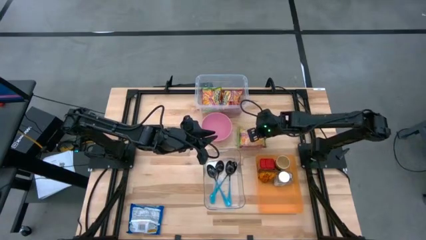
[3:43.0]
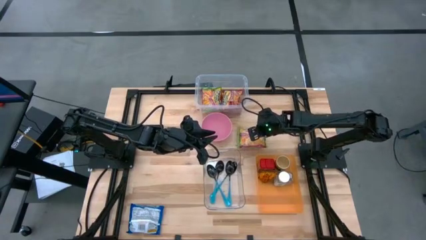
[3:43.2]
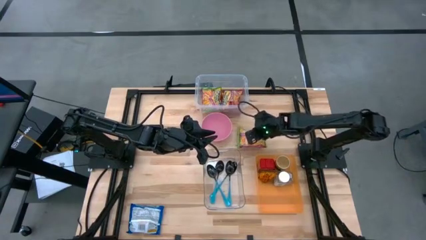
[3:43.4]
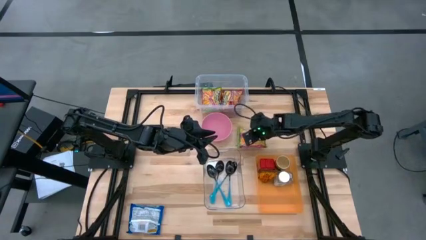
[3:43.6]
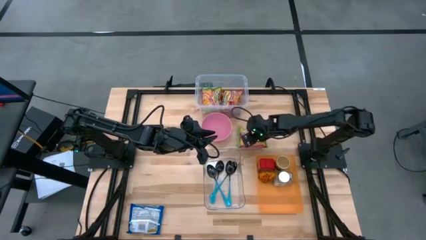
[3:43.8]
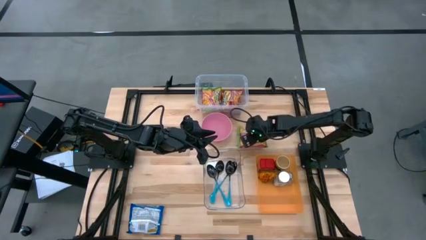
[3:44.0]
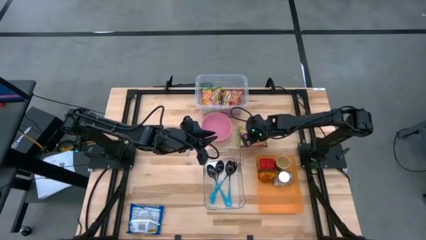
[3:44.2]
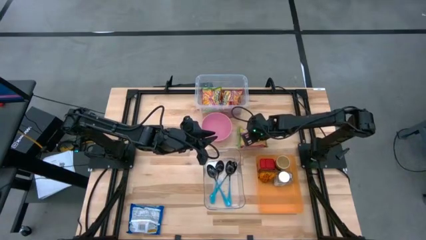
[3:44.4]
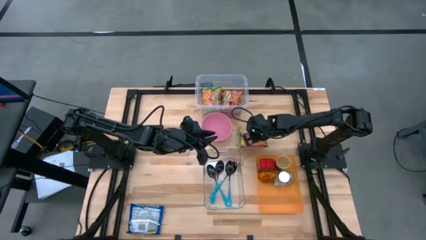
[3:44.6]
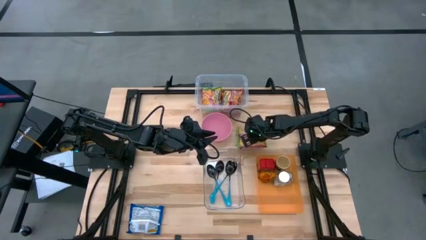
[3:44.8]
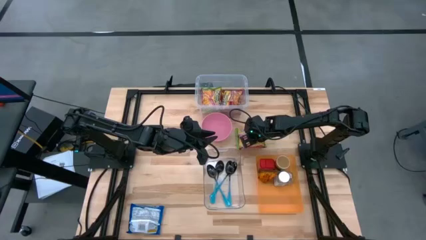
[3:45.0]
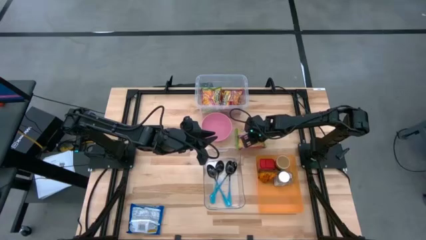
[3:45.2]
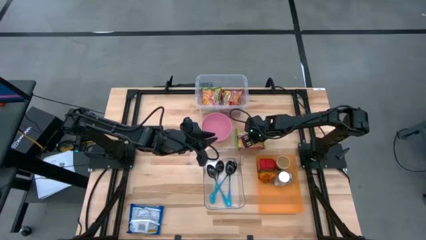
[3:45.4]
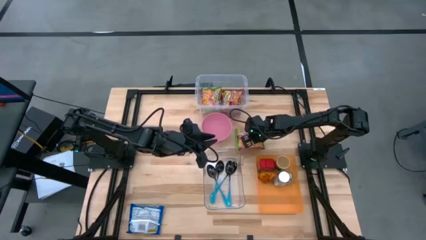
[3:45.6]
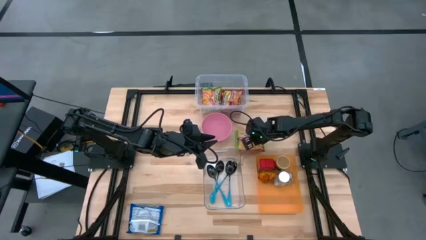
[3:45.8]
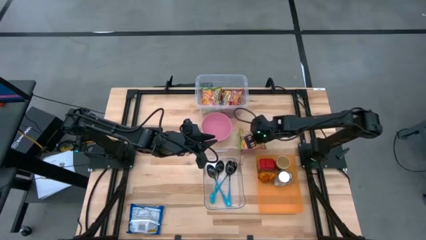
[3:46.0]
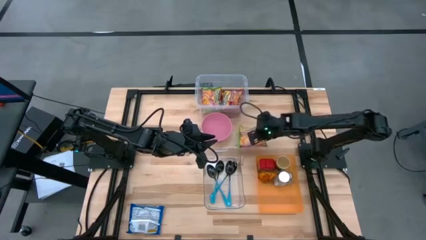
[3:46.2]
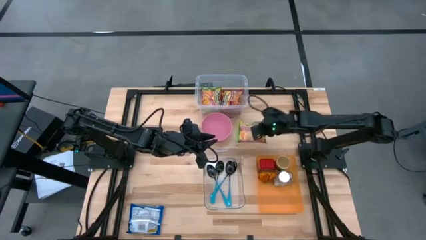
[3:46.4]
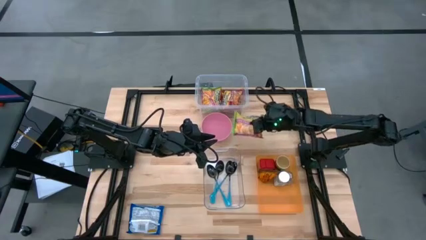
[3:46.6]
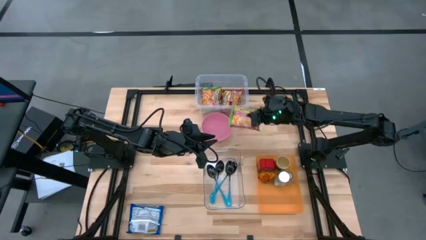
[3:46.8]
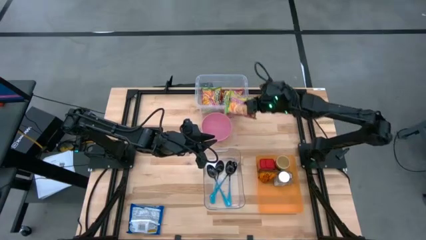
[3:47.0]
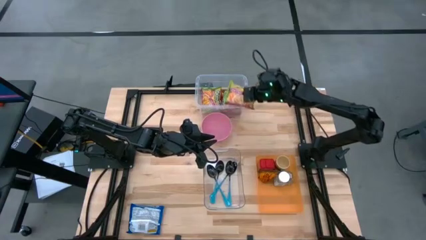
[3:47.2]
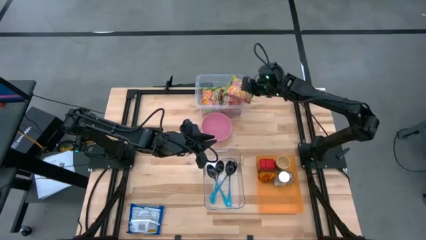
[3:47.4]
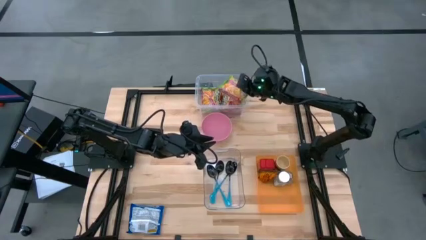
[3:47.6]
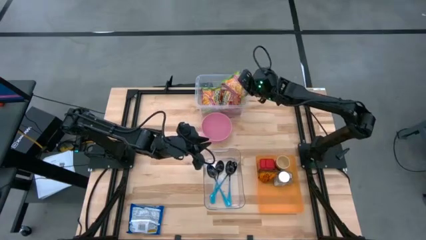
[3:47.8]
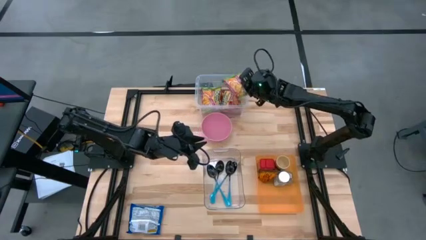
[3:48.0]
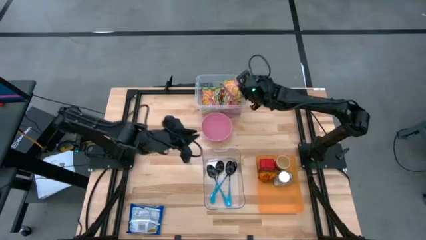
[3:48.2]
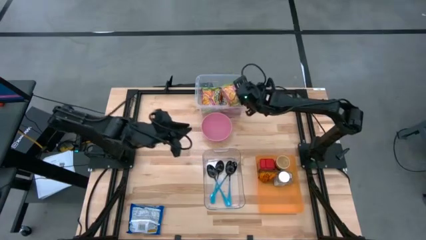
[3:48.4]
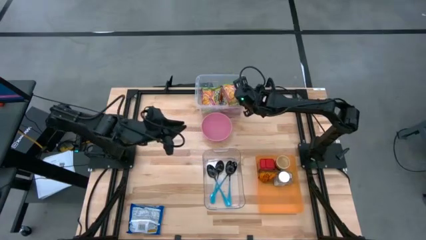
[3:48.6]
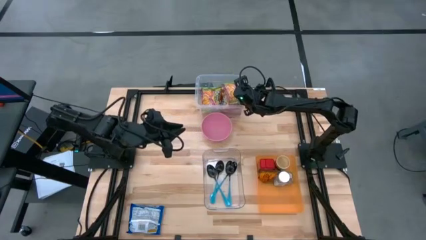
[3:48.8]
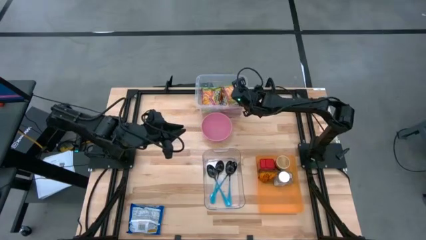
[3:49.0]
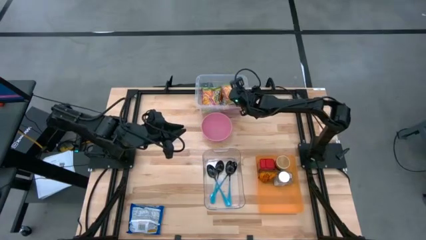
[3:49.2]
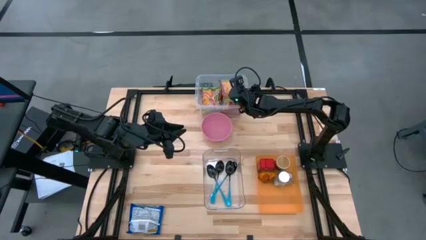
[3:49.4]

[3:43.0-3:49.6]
Task: Pick & Place Food Item
Put the green noodle pack into the top transparent bin

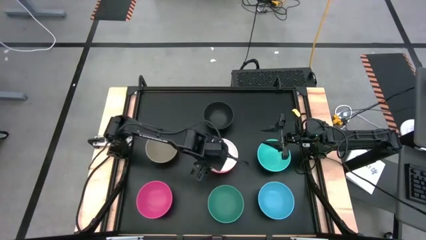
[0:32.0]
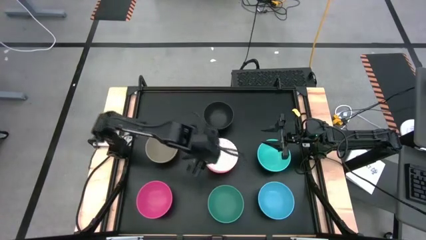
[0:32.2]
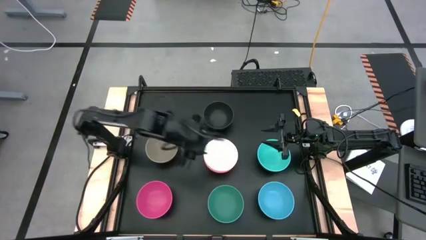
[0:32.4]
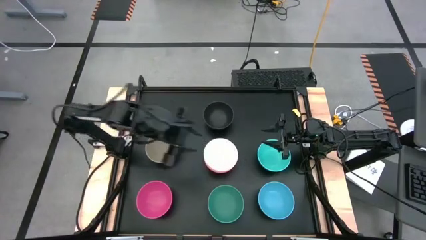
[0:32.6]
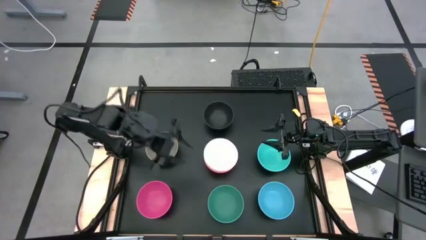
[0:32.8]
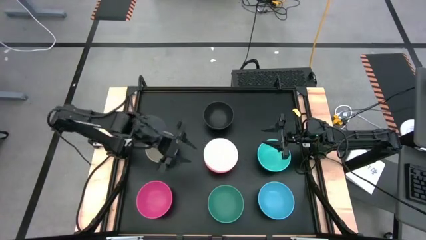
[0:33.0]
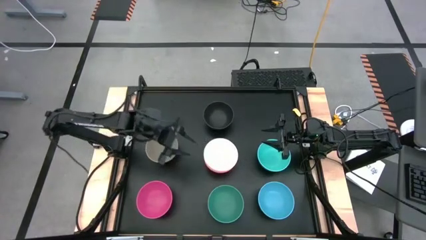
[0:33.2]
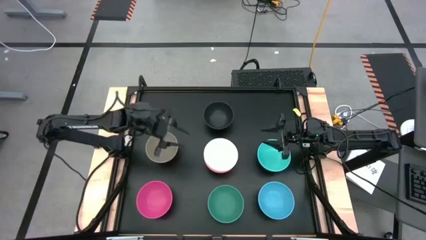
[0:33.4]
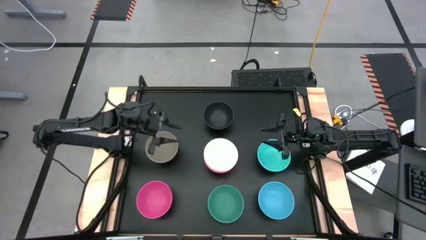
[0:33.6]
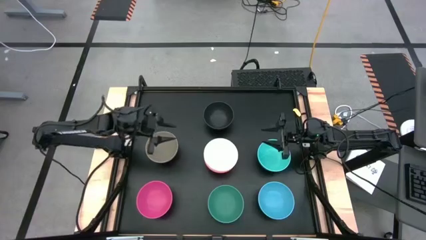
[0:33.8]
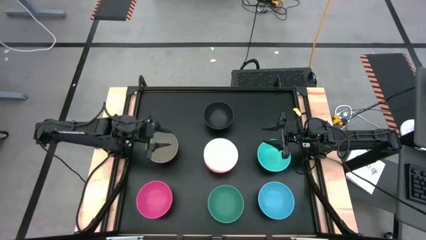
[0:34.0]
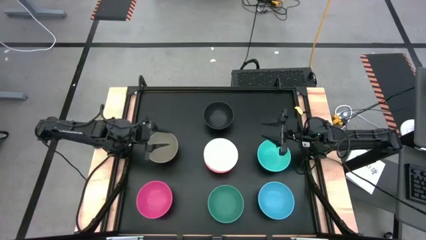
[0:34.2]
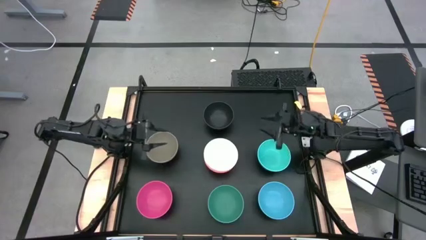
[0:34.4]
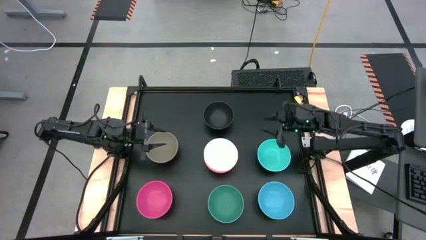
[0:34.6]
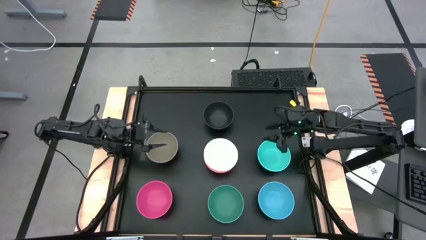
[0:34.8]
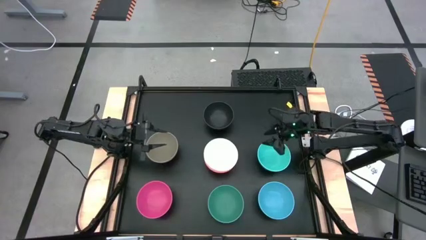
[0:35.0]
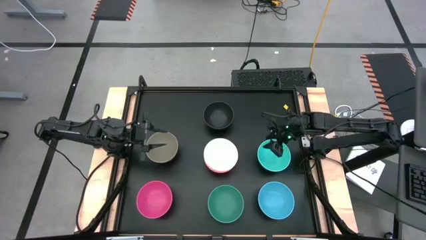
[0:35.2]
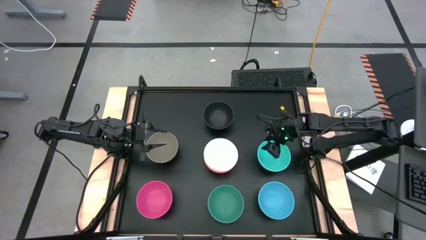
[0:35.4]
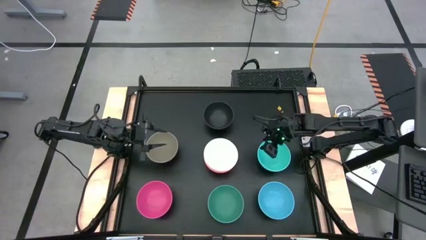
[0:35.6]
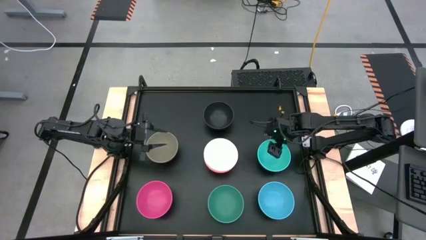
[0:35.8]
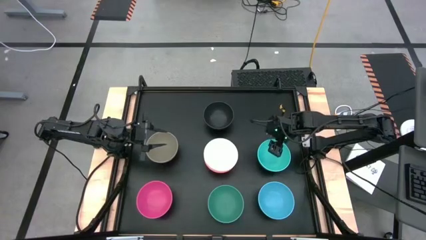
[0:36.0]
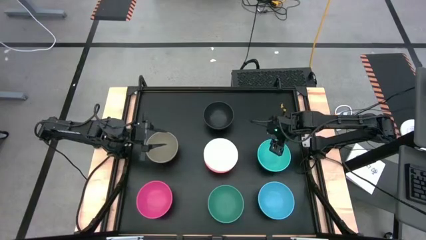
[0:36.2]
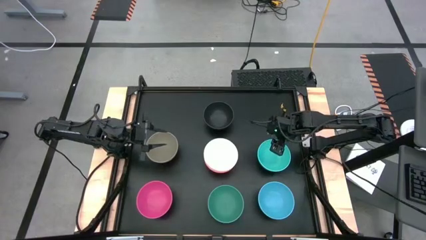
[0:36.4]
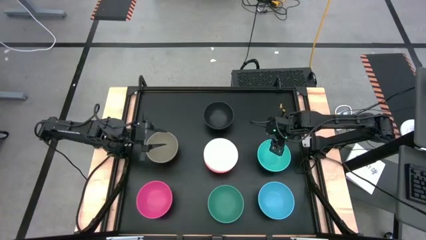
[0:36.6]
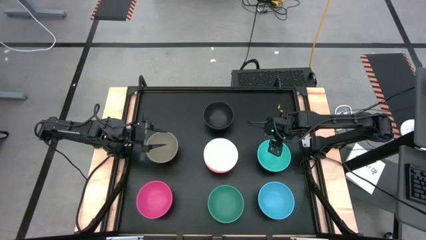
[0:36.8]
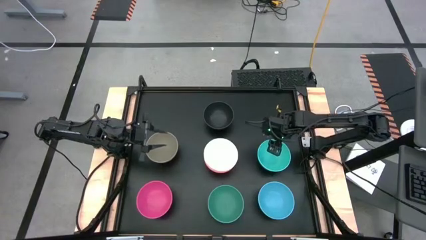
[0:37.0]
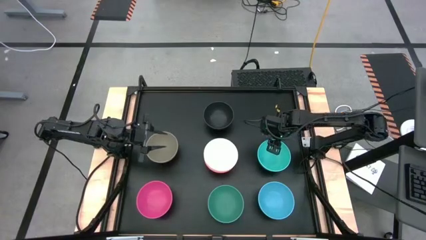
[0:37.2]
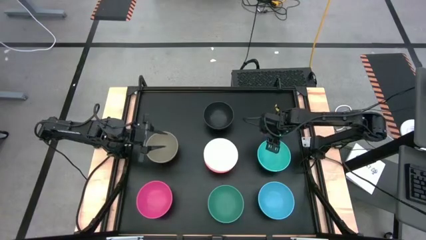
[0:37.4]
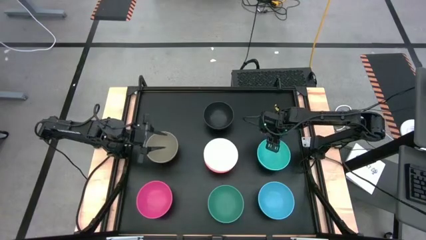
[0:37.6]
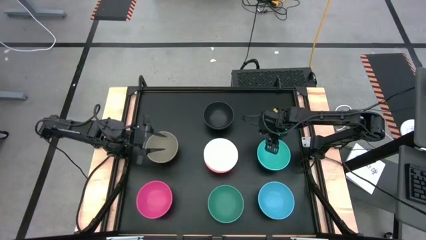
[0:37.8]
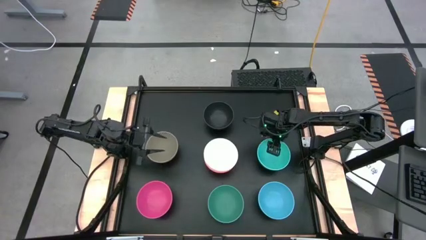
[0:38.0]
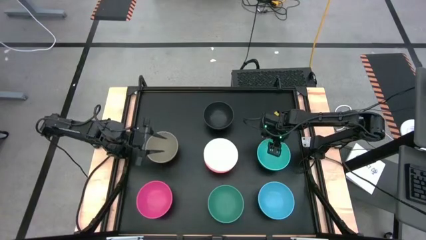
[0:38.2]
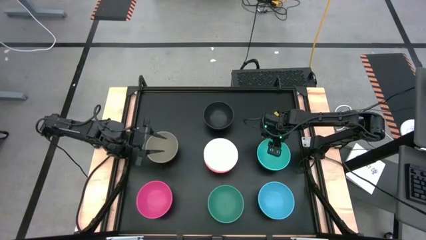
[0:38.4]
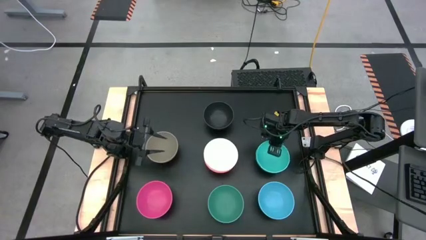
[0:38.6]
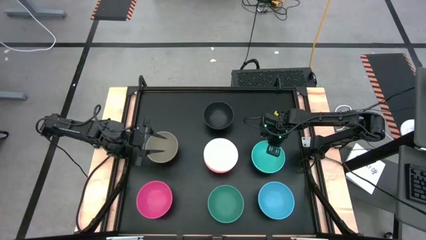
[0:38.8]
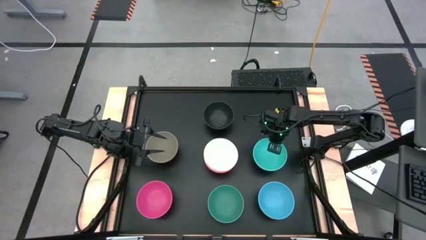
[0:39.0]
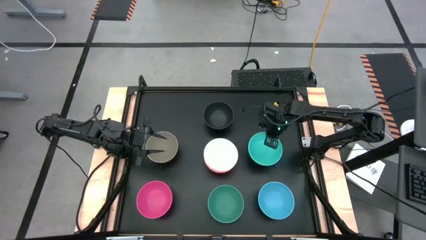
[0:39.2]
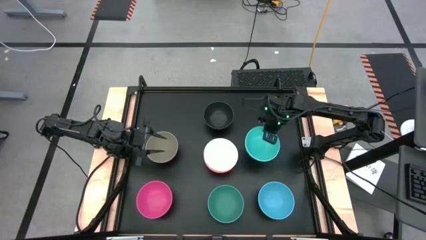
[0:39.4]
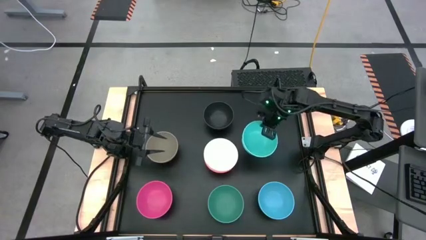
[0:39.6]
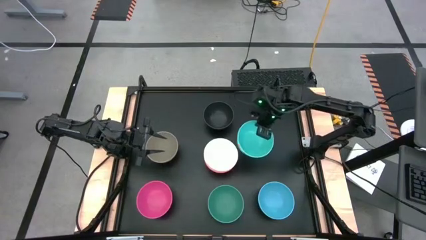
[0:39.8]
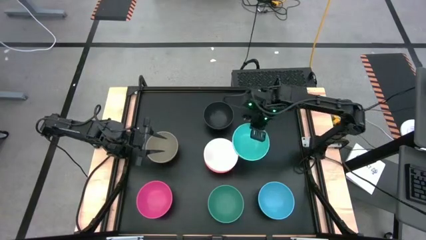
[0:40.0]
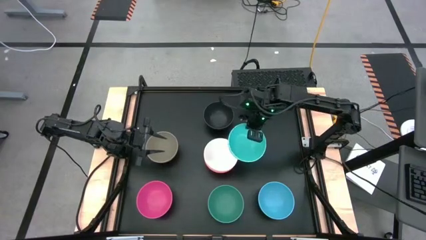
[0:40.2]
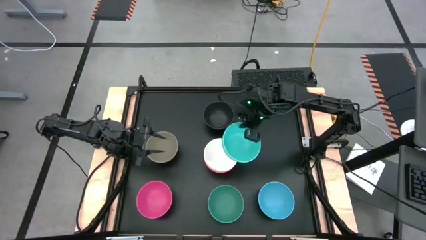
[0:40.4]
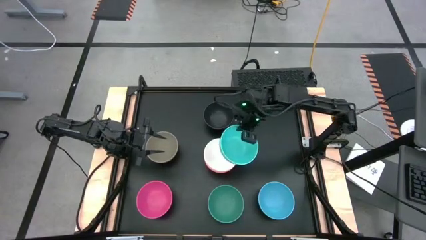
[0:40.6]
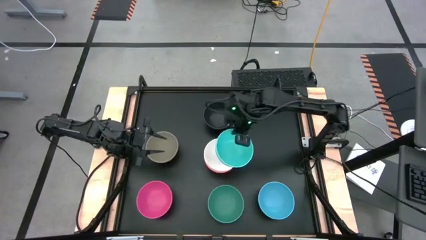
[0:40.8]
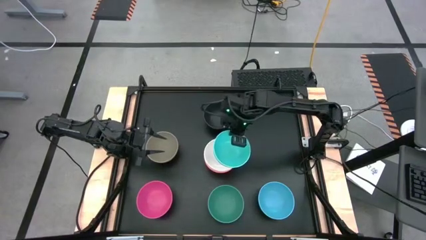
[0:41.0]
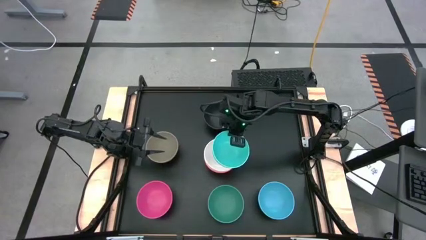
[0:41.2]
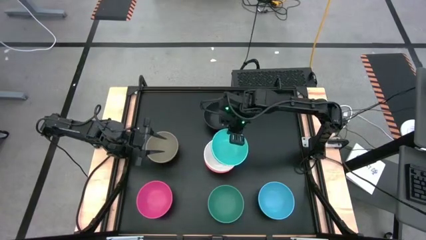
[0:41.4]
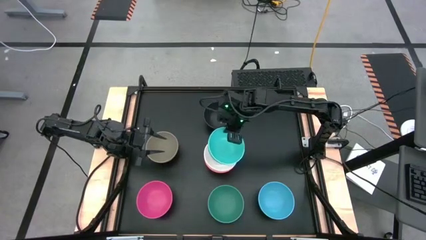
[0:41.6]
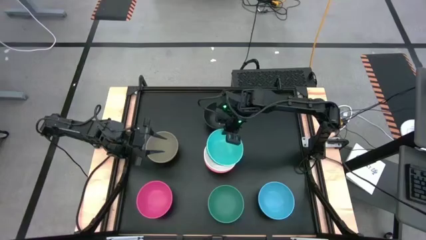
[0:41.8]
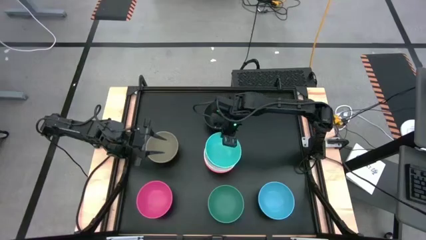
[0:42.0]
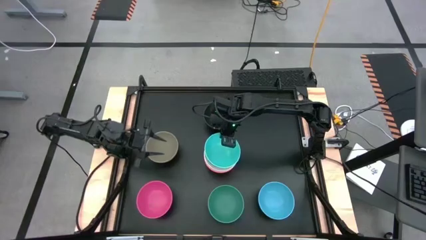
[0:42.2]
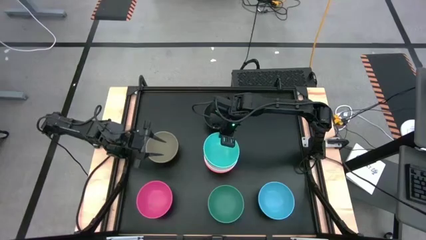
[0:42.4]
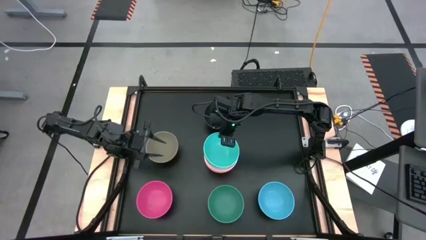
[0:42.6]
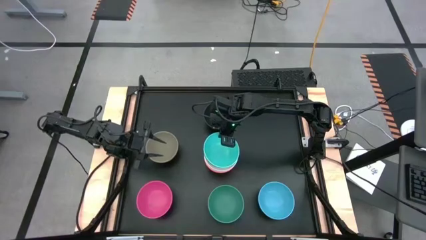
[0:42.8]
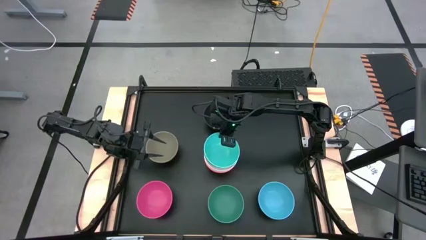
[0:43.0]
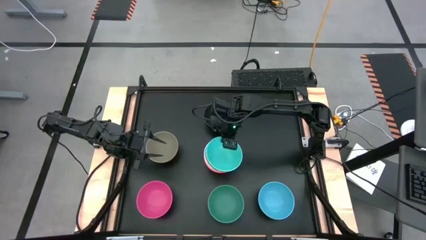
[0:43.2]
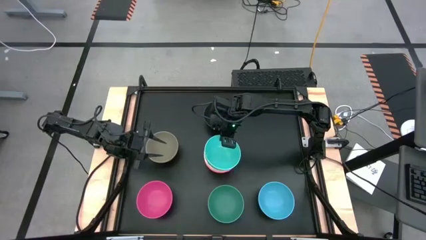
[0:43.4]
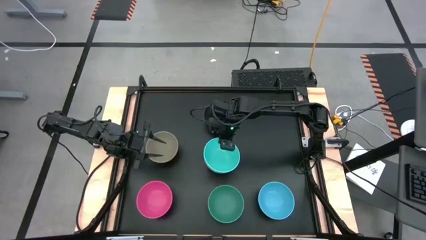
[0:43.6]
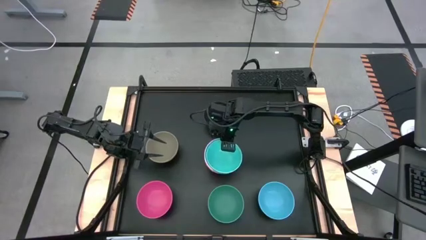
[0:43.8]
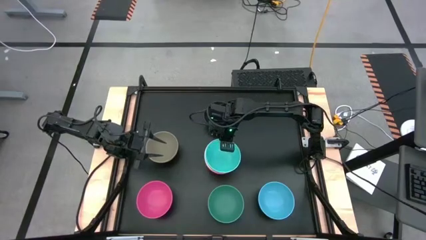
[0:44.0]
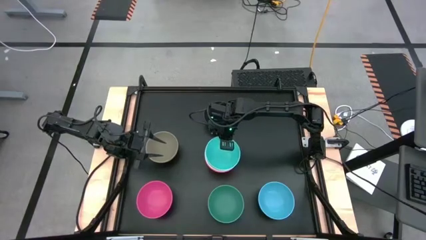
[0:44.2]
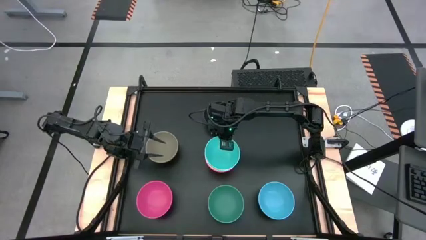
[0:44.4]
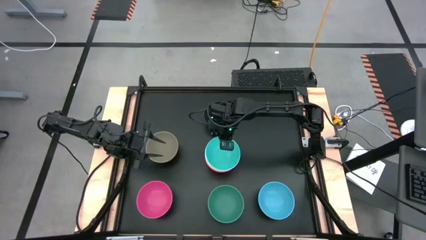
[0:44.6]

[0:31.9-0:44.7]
Task: Nest bowls inside each other
Stack the light blue bowl on the white bowl
